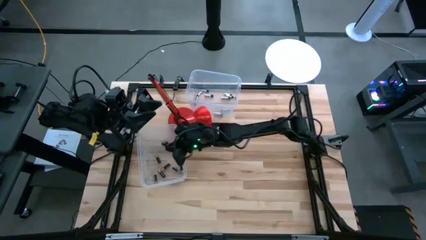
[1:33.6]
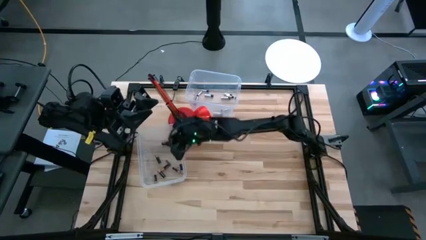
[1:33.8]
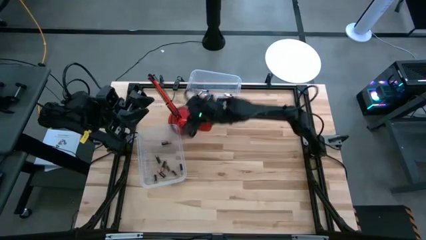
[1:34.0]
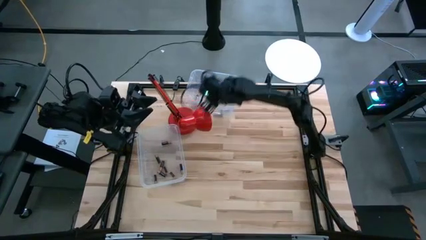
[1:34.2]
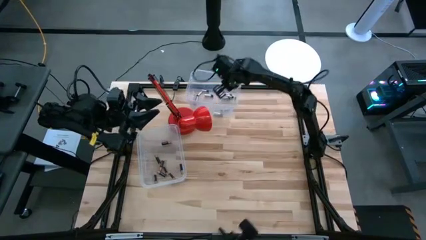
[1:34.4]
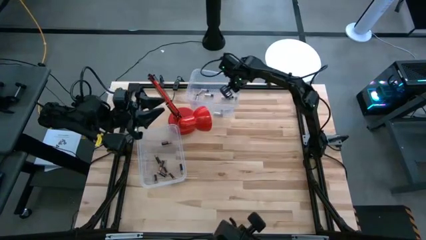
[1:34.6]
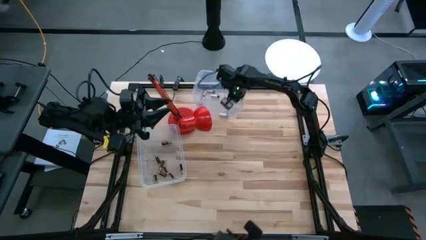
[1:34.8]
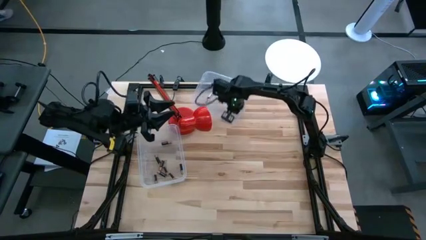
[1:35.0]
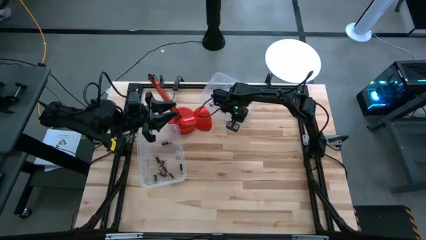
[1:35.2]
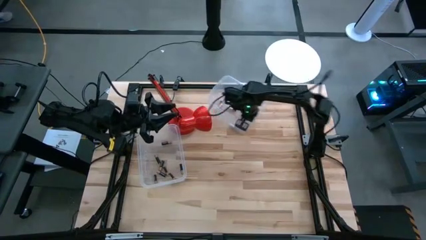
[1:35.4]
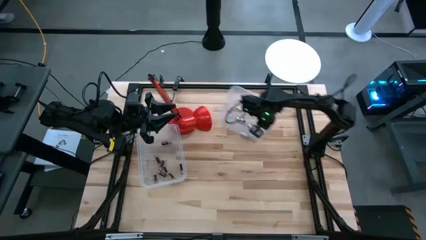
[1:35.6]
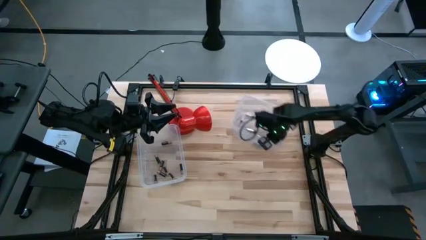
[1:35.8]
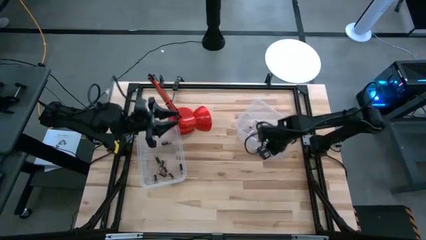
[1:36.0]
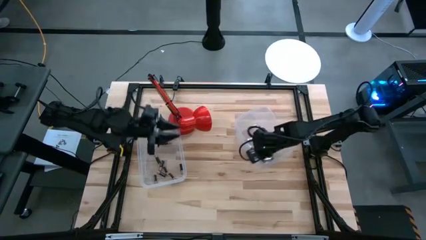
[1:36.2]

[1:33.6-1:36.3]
Task: Sort batteries
Move the top transparent bin to the center of the table

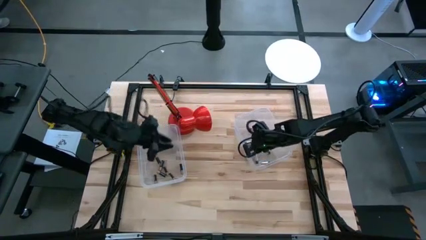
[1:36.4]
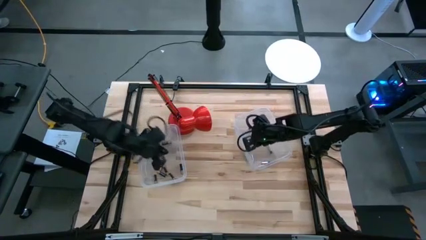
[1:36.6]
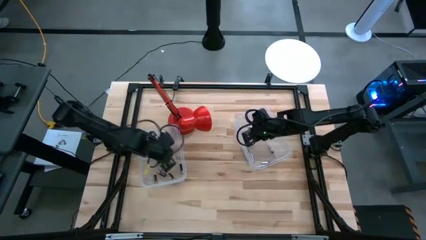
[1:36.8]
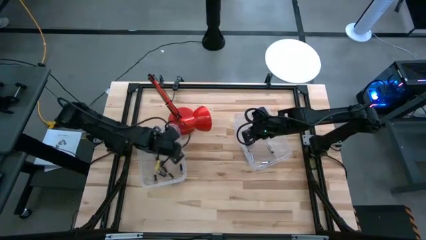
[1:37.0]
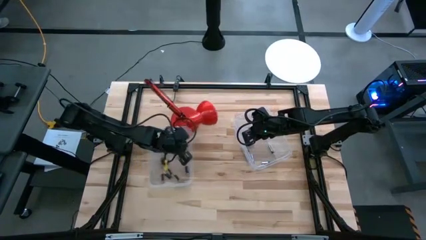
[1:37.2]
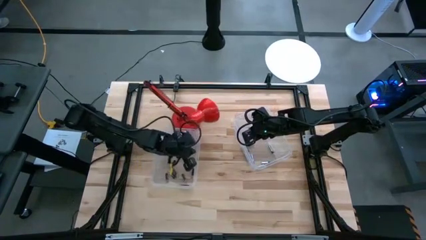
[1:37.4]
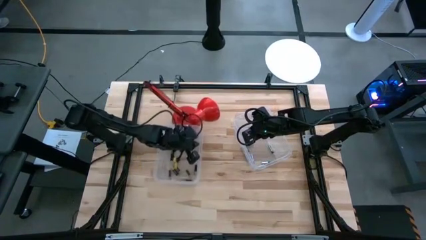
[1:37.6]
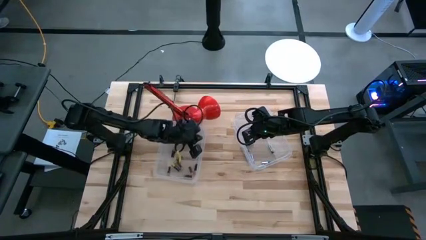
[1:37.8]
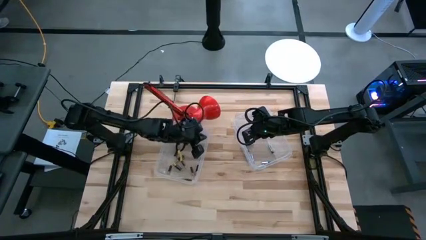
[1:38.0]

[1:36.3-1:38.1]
Move the bottom transparent bin closer to the center

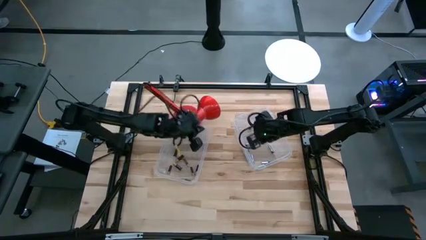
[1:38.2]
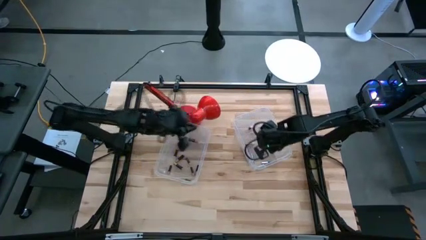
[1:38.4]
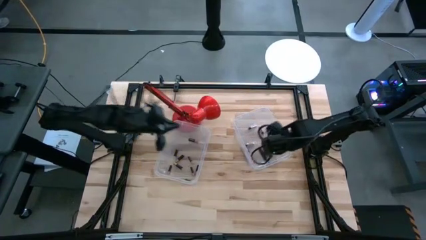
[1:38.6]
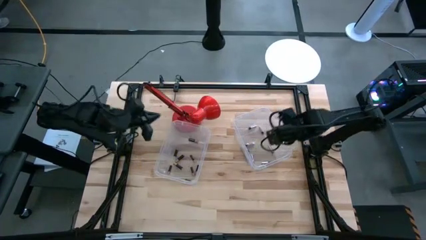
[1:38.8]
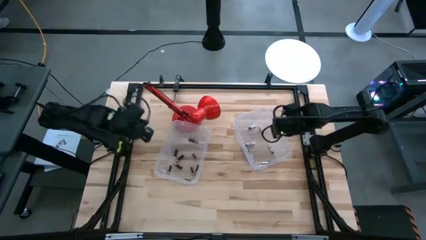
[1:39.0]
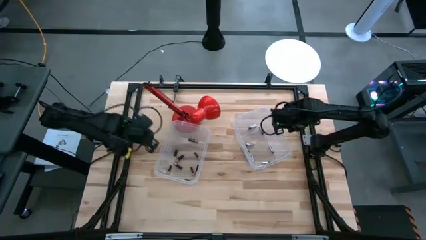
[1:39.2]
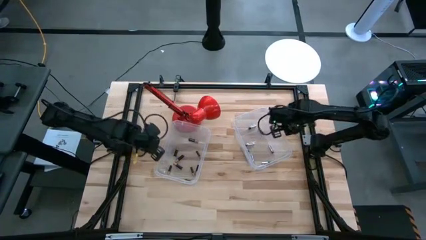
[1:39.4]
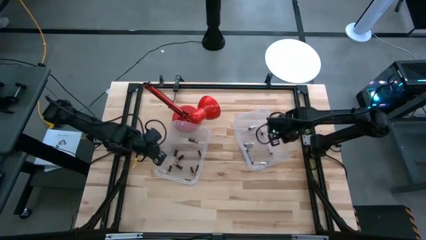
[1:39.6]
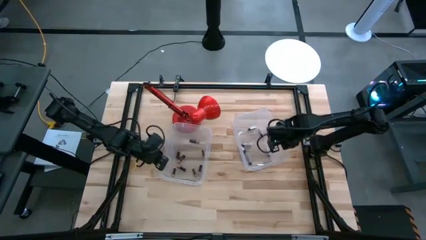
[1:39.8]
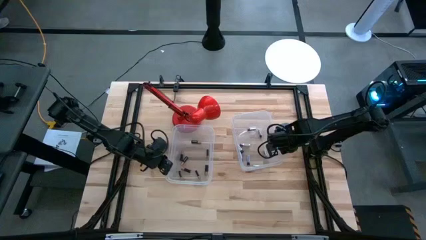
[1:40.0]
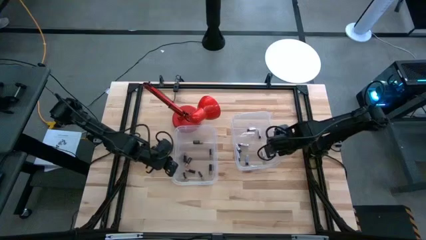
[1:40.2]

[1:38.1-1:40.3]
Adjust the transparent bins

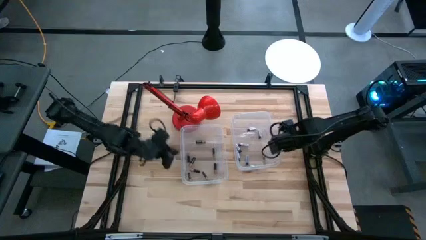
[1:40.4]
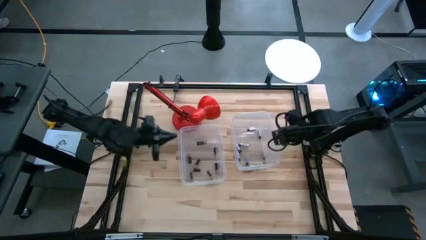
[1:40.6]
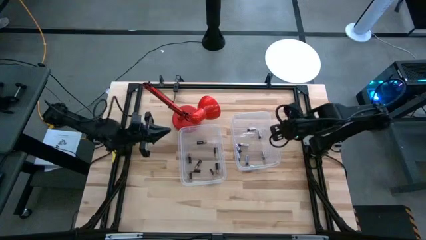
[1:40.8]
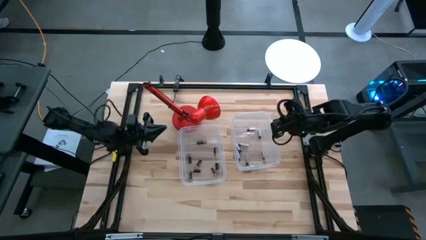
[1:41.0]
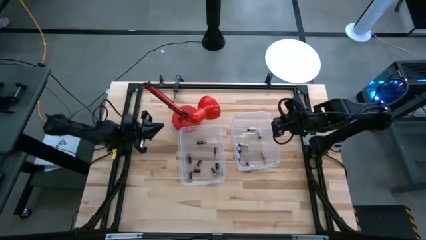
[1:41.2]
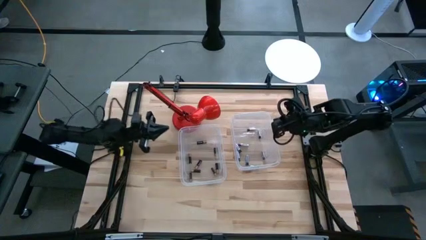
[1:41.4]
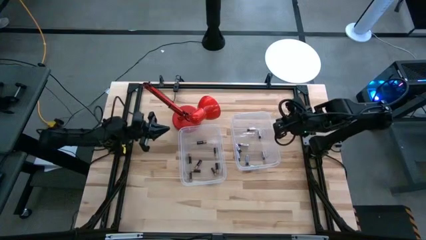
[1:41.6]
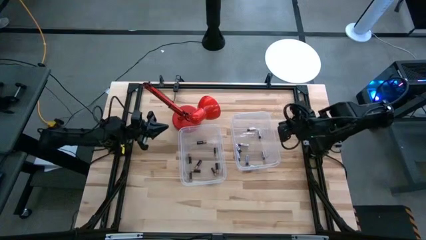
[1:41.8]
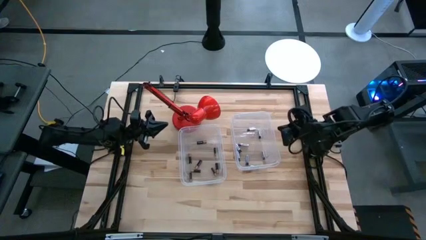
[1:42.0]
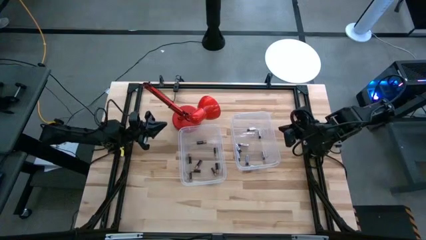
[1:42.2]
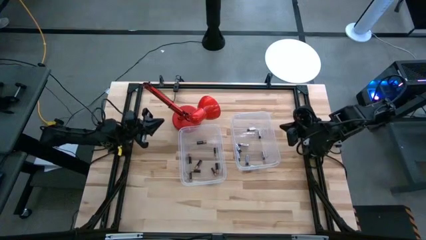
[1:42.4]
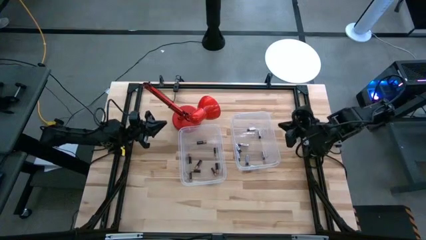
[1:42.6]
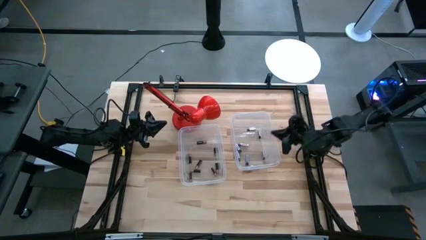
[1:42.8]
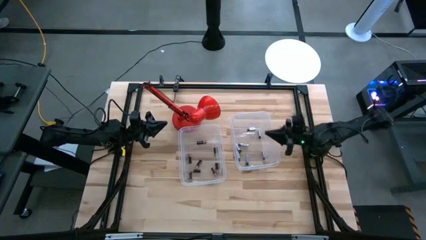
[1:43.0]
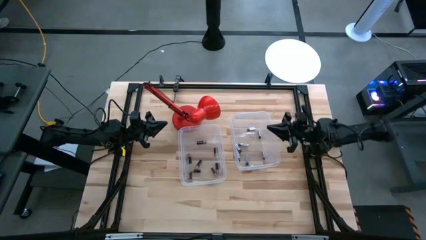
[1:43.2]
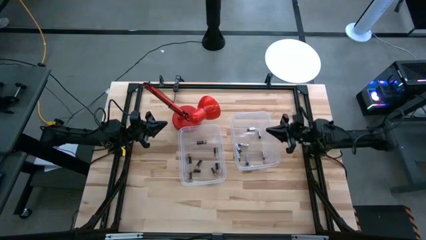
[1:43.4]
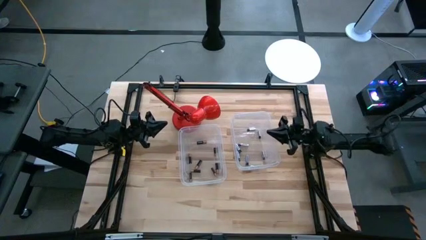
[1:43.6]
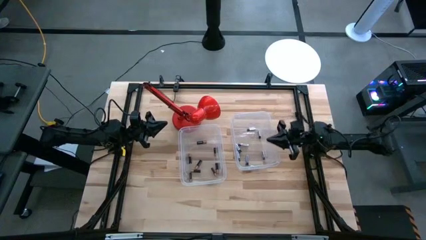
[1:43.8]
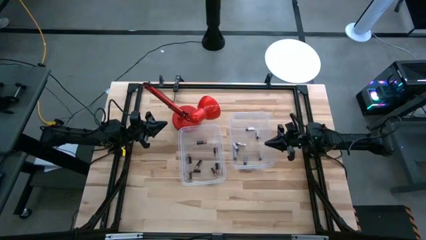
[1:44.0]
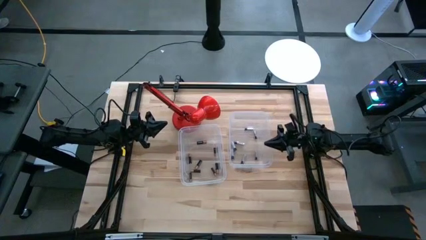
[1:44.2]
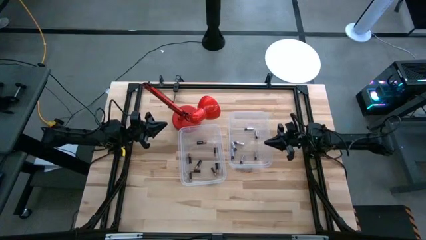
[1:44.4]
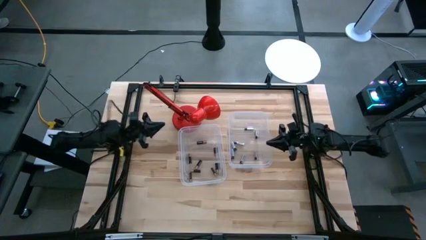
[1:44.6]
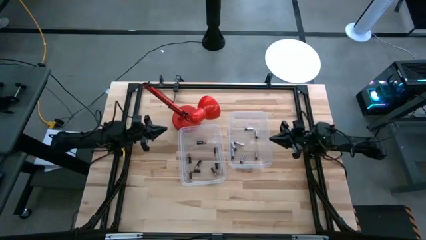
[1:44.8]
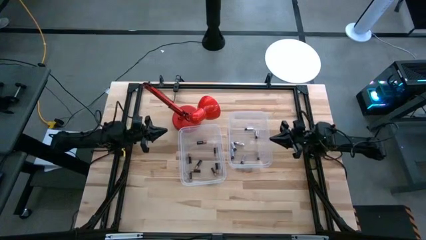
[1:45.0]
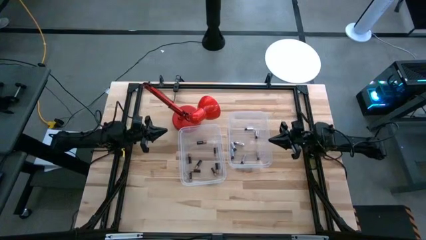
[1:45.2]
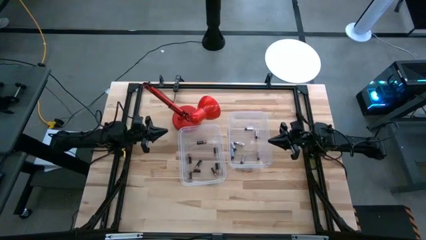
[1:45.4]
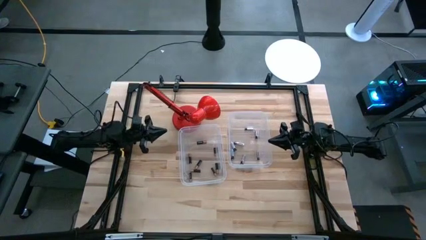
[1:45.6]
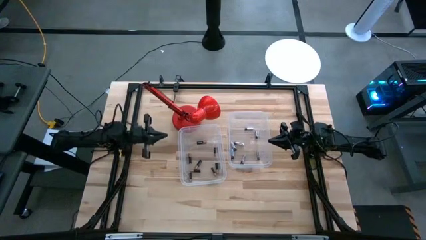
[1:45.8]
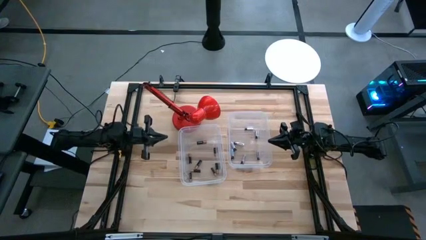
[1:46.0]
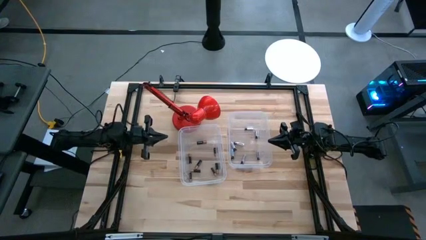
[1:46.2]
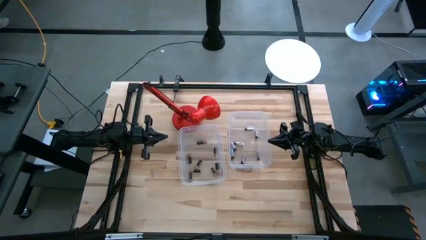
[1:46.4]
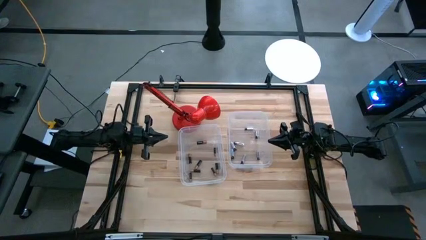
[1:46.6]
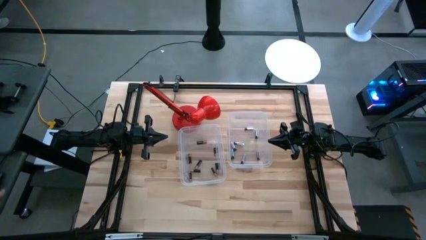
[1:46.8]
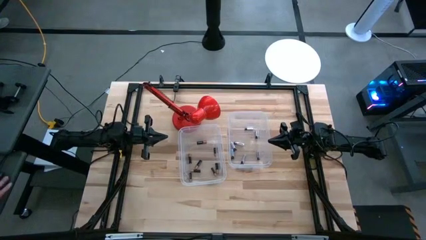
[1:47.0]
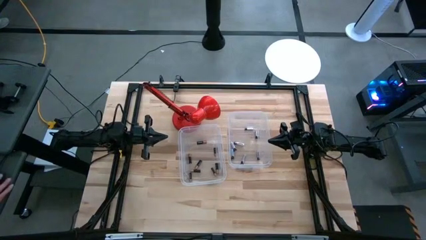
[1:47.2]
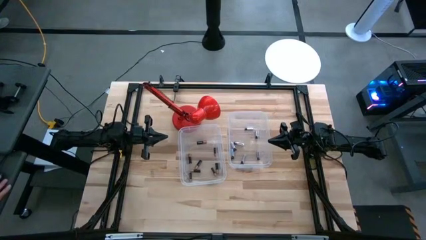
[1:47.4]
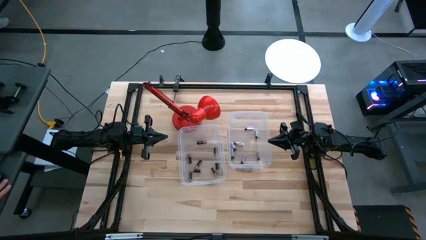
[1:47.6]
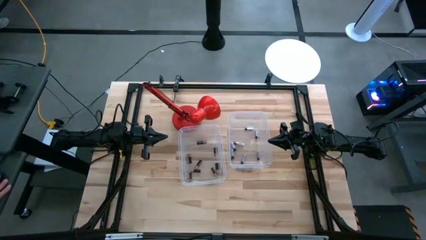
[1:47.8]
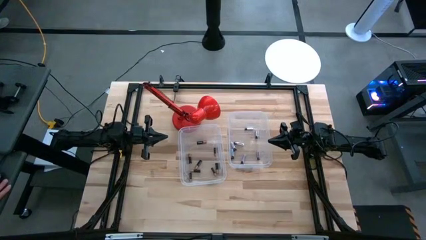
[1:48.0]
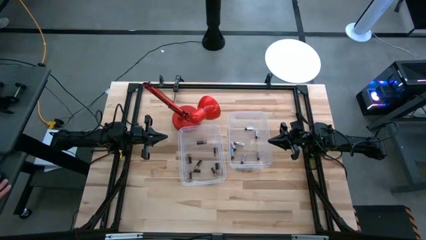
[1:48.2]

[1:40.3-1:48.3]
Return to Home Position

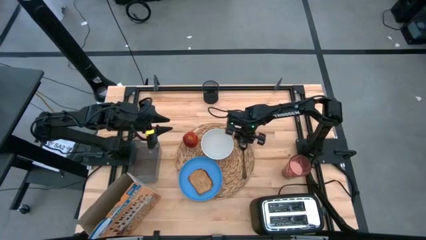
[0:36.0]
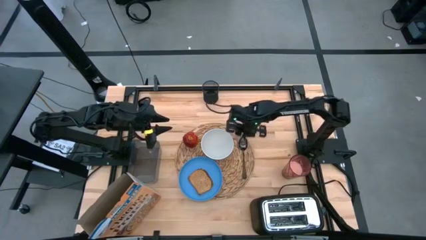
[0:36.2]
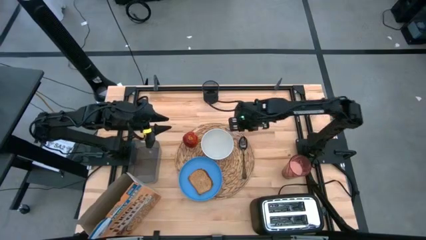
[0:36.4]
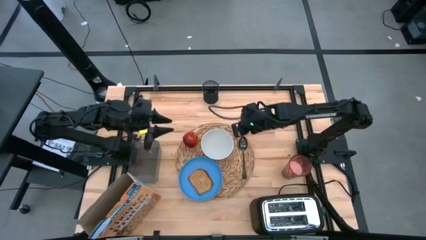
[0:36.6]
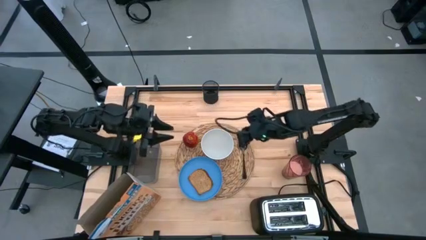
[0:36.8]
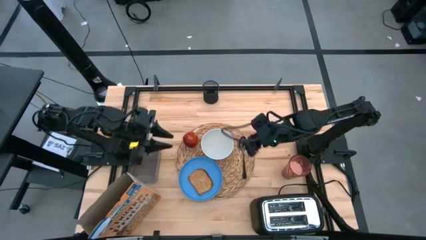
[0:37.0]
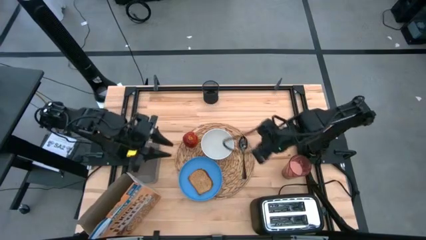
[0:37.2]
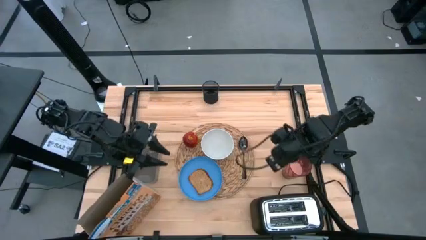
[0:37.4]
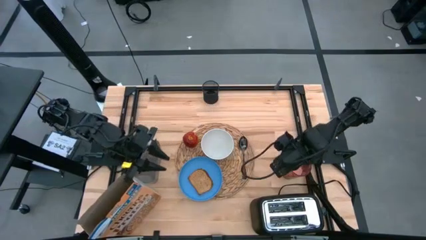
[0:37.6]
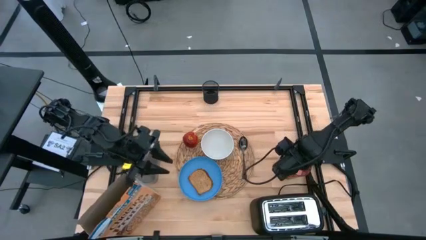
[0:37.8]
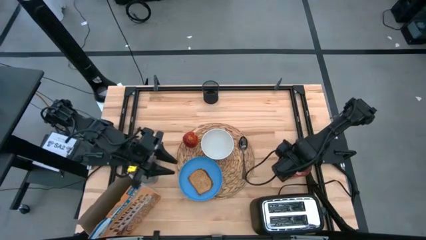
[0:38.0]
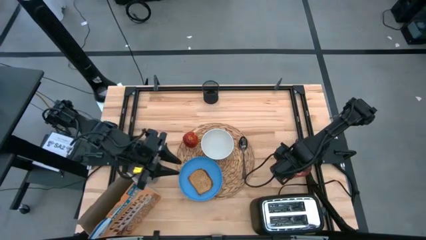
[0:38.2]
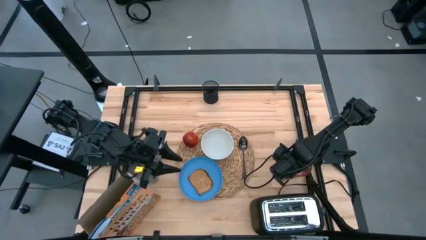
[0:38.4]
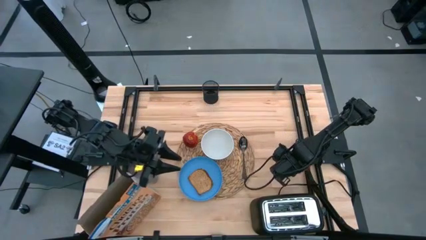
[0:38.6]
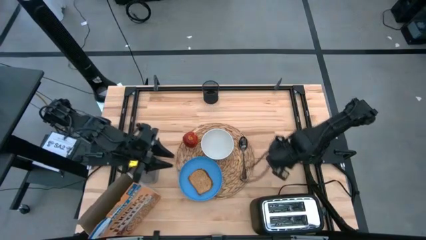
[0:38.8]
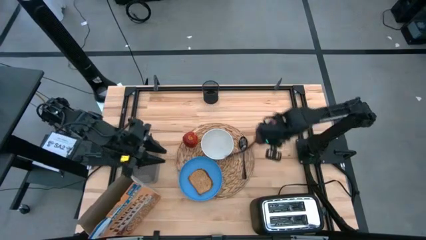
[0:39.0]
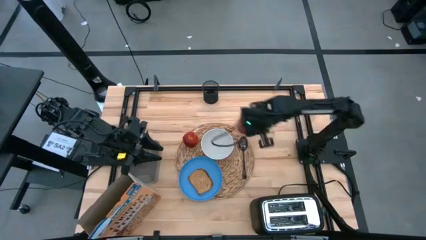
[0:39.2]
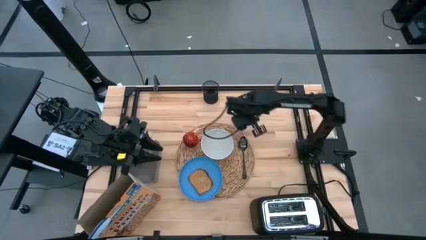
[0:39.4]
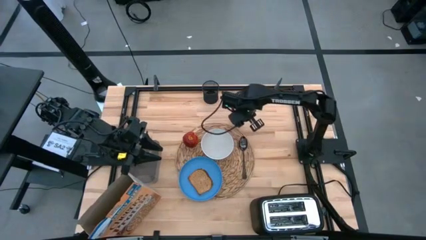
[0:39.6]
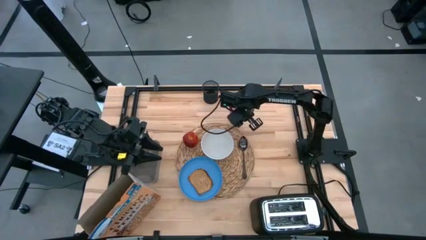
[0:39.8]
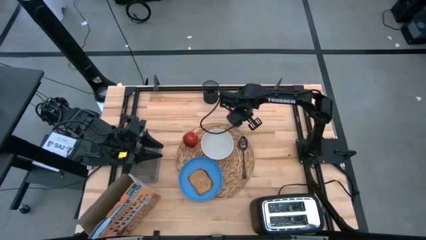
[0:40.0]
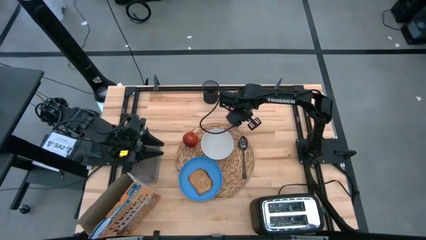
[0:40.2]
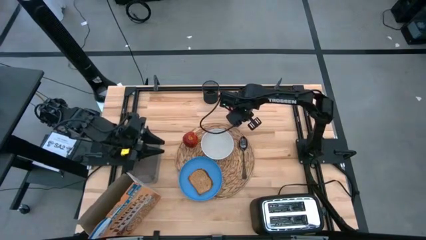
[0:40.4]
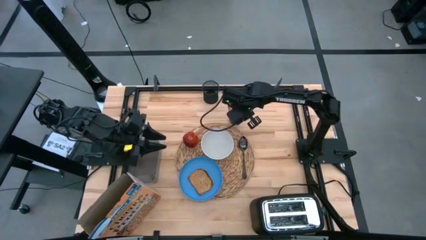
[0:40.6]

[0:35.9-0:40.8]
Task: Arrange a breakfast setting
Put the red cup to the top of the brown placemat
